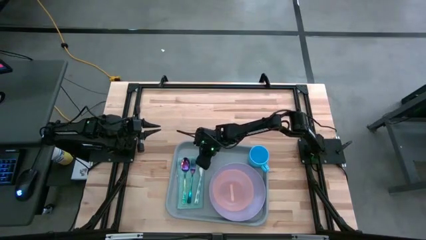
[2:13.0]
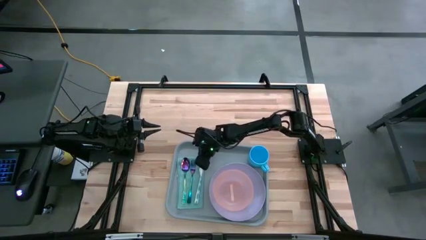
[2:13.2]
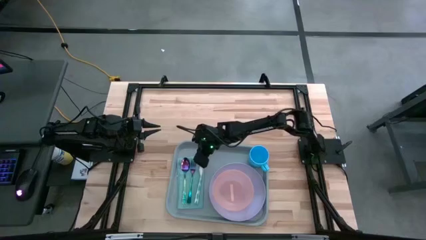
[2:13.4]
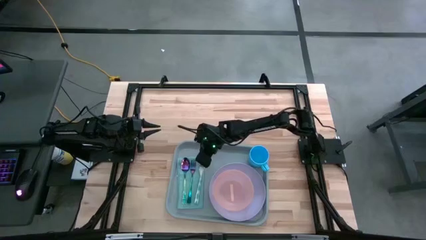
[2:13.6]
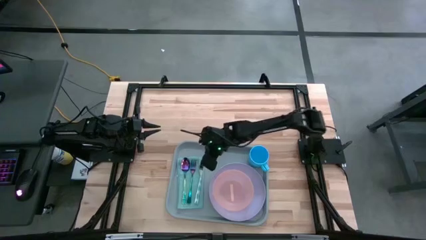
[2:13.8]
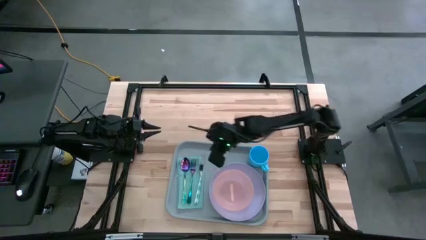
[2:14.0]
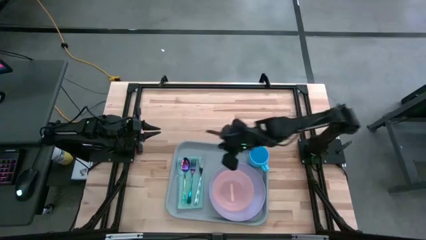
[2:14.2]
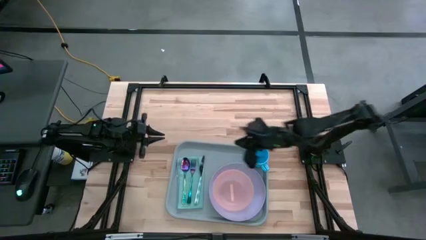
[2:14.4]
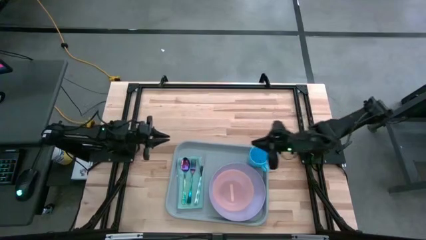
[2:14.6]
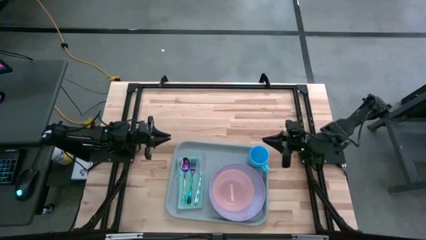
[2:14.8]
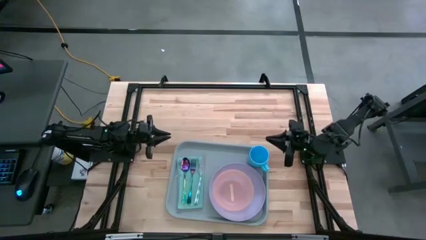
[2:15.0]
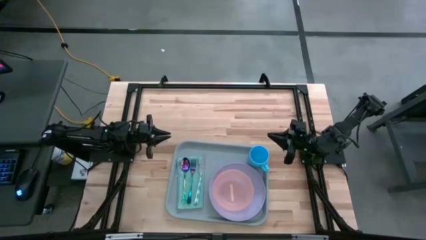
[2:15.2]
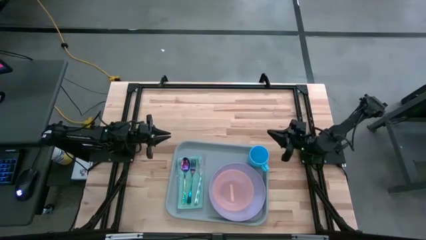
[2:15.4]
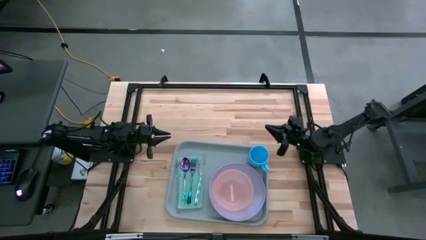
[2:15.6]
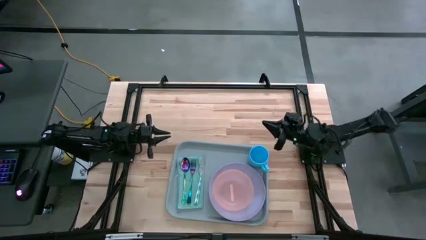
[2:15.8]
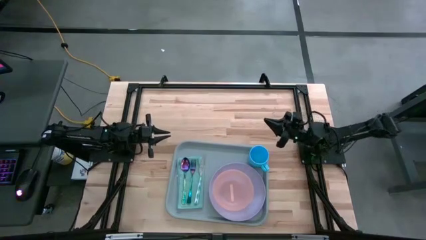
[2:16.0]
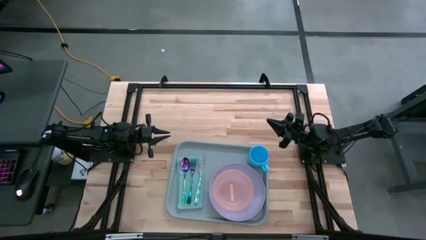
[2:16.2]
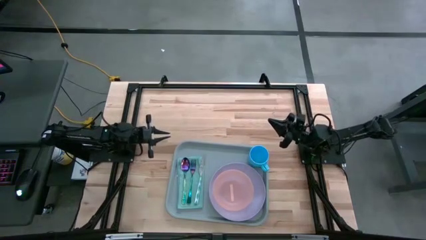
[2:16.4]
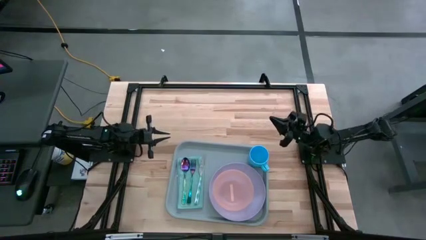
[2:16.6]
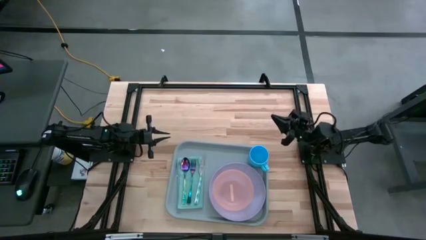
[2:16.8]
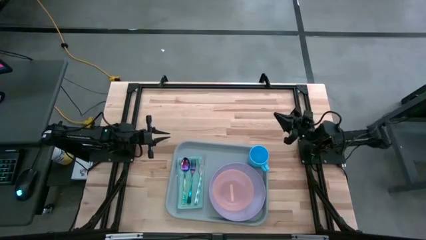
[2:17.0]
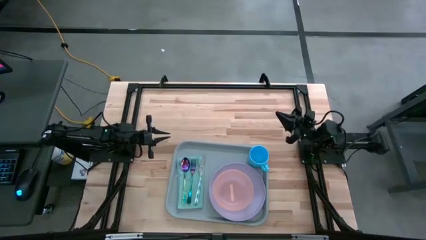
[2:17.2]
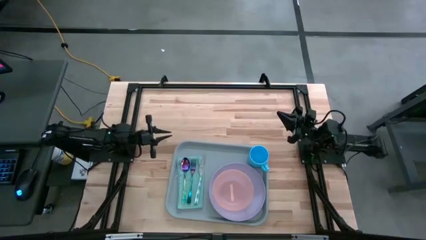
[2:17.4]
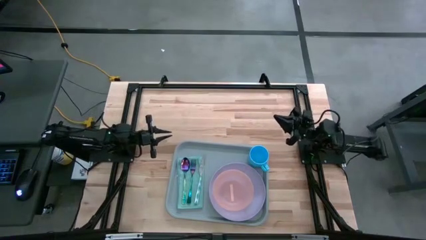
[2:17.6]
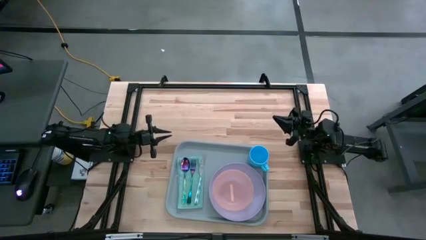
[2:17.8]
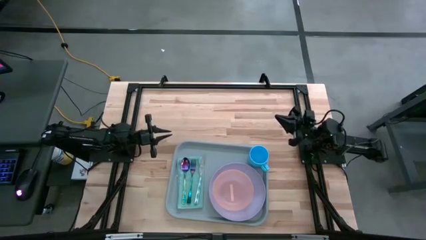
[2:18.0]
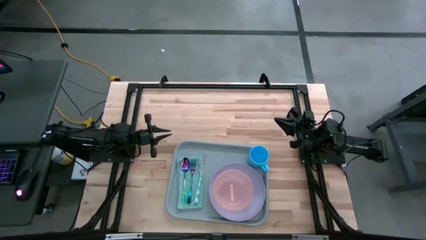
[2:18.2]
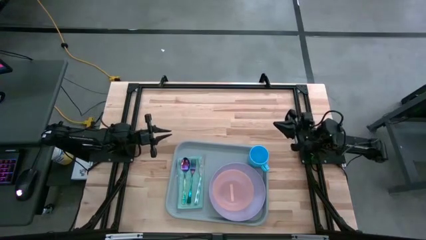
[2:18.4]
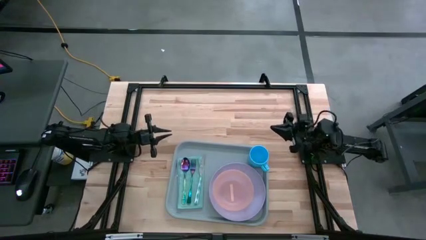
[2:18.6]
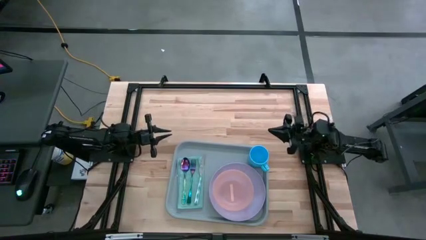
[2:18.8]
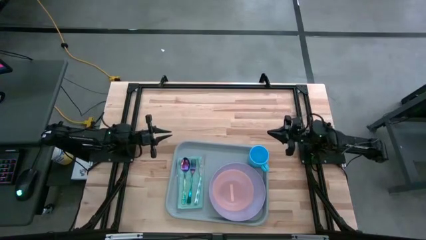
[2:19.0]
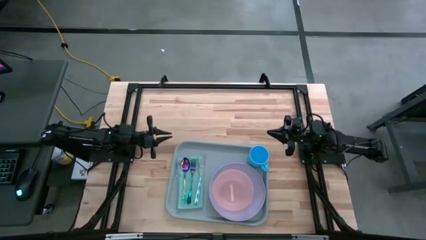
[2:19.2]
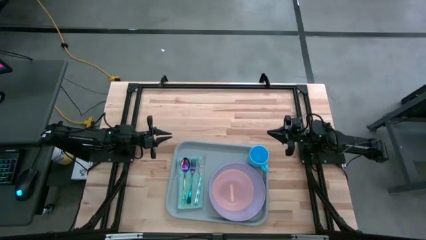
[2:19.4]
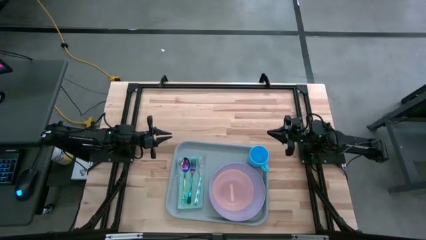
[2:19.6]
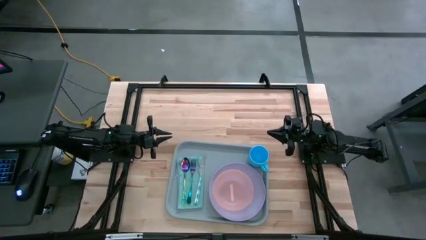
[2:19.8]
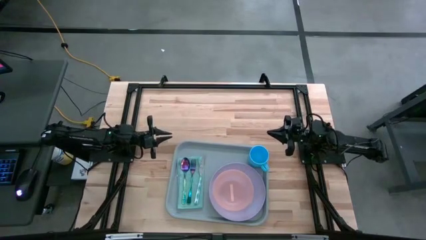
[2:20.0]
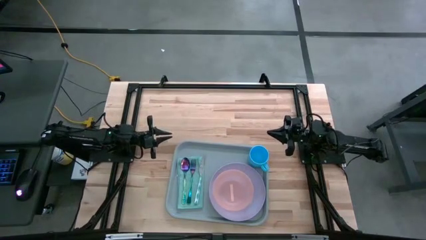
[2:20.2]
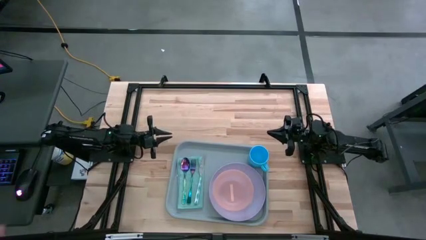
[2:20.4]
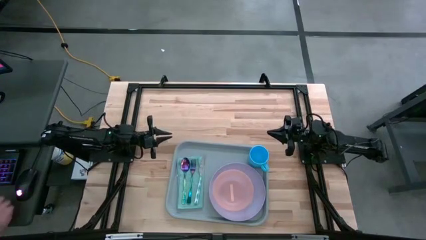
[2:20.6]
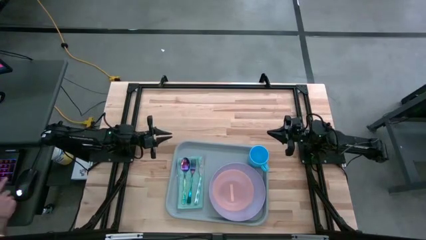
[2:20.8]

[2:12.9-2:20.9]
Task: Set up tray
Return to Home Position

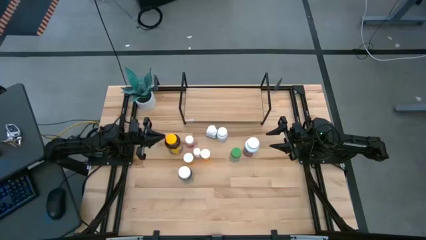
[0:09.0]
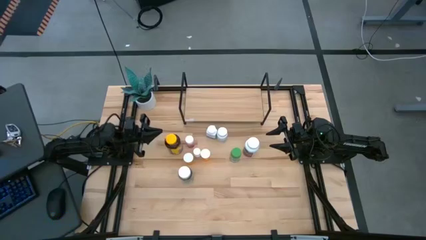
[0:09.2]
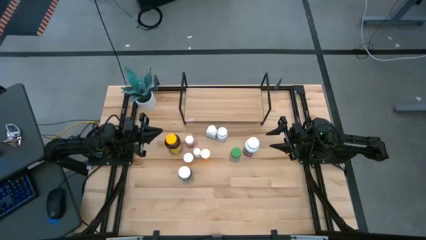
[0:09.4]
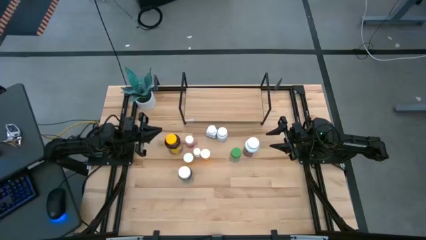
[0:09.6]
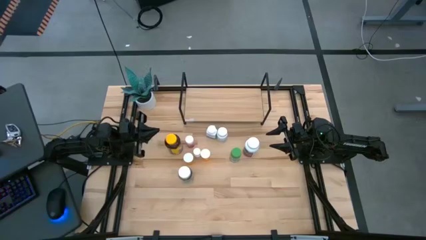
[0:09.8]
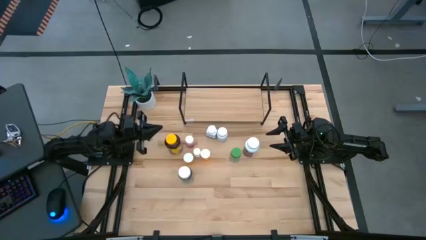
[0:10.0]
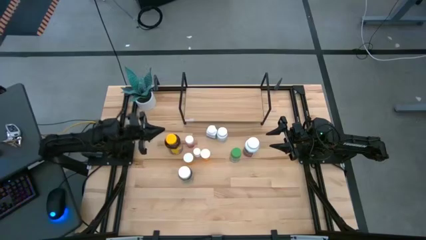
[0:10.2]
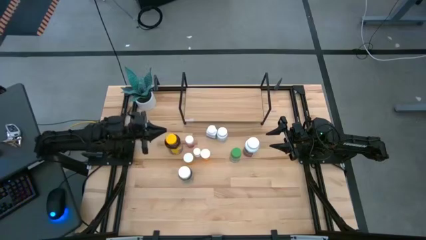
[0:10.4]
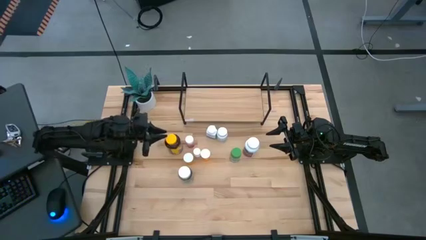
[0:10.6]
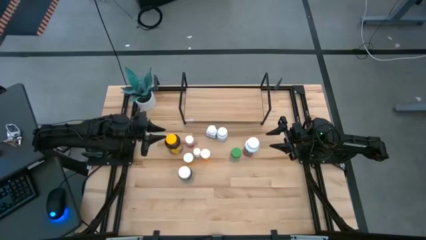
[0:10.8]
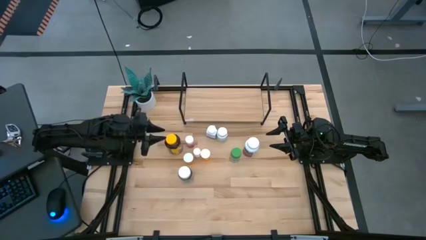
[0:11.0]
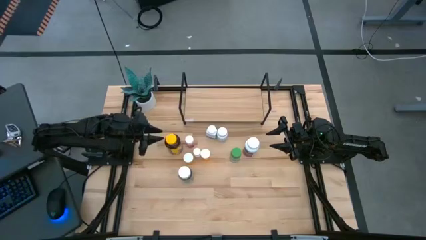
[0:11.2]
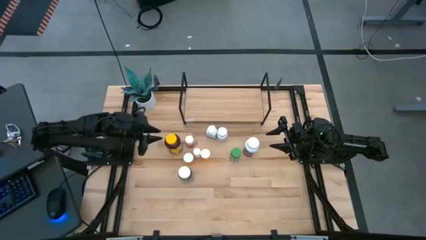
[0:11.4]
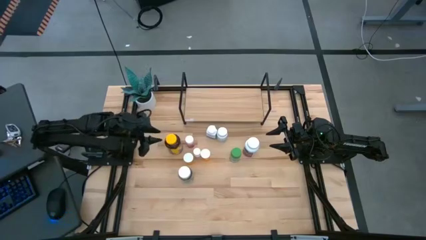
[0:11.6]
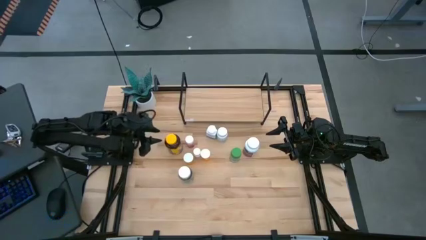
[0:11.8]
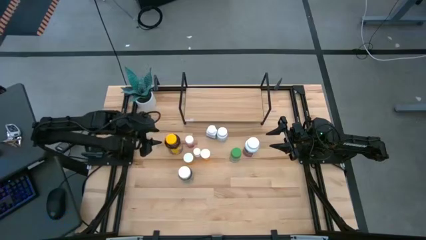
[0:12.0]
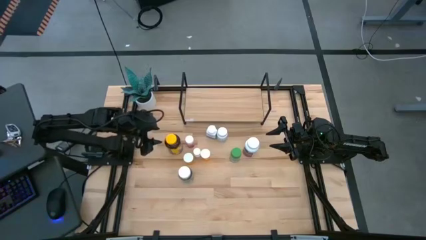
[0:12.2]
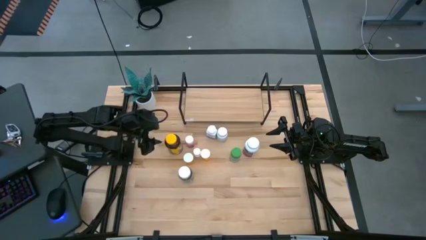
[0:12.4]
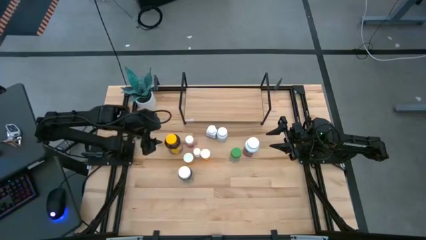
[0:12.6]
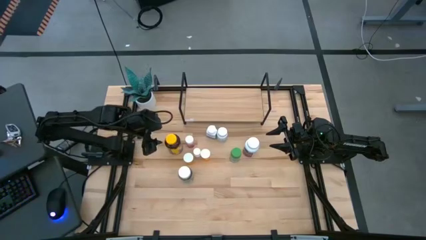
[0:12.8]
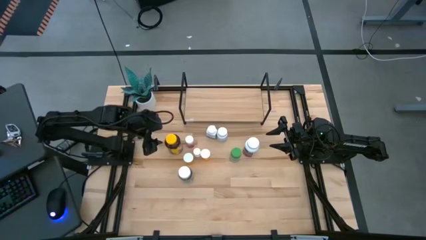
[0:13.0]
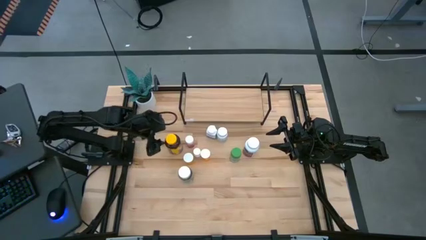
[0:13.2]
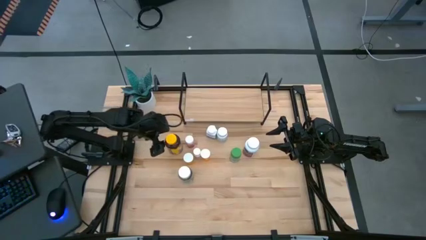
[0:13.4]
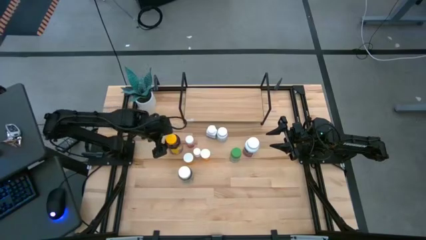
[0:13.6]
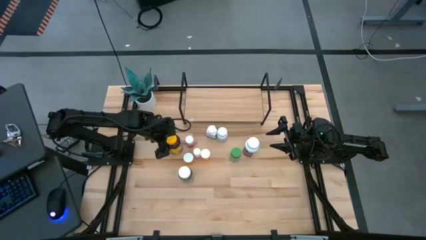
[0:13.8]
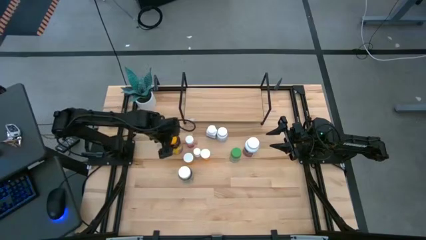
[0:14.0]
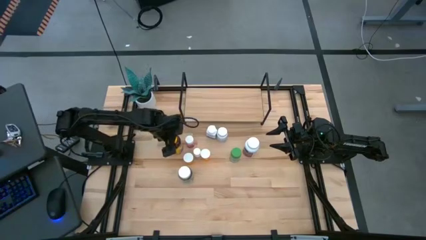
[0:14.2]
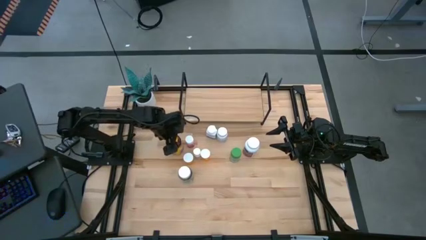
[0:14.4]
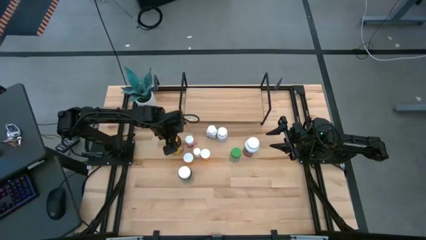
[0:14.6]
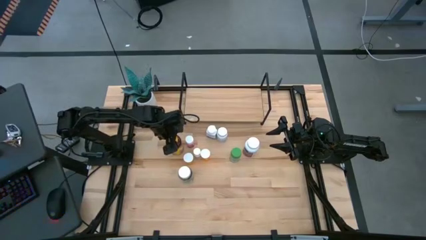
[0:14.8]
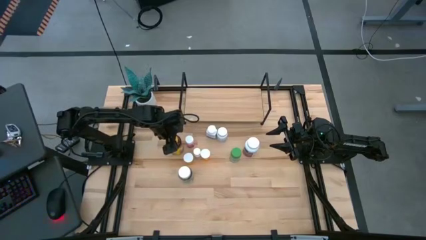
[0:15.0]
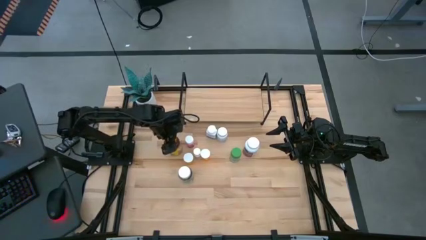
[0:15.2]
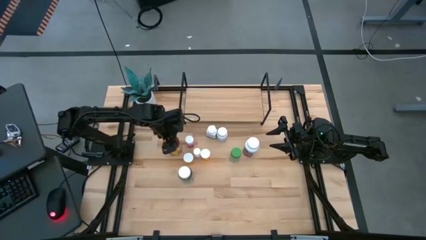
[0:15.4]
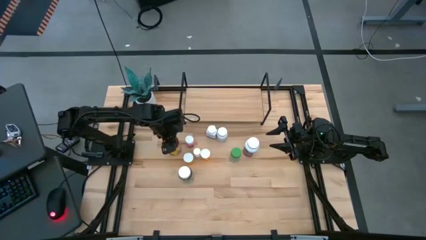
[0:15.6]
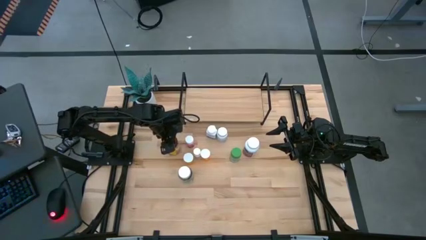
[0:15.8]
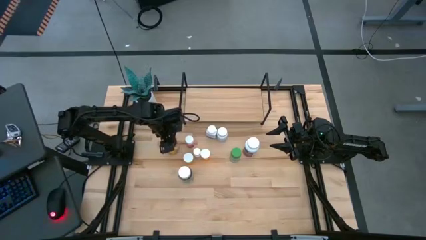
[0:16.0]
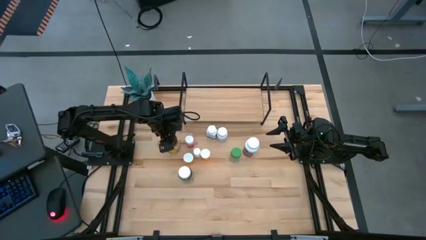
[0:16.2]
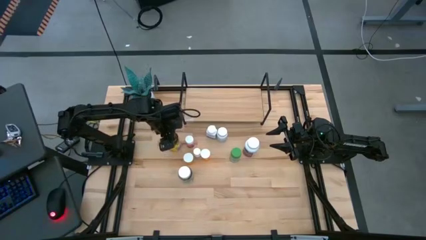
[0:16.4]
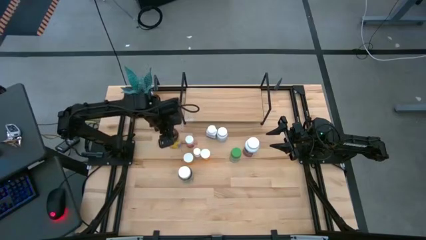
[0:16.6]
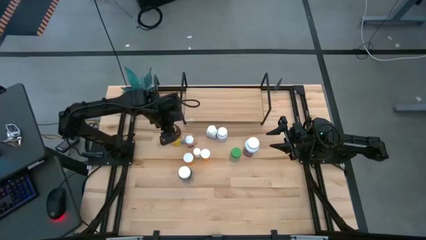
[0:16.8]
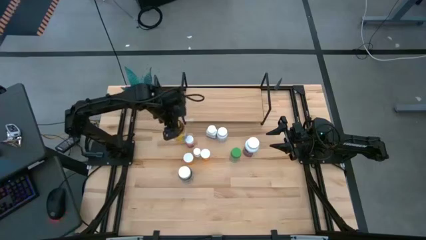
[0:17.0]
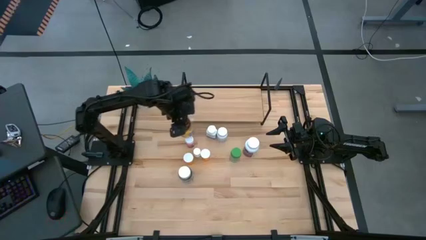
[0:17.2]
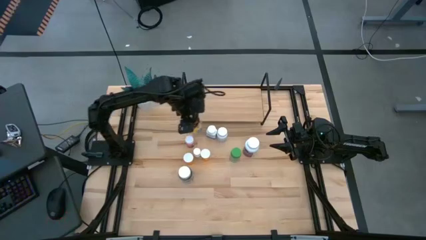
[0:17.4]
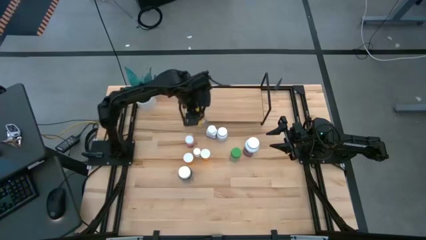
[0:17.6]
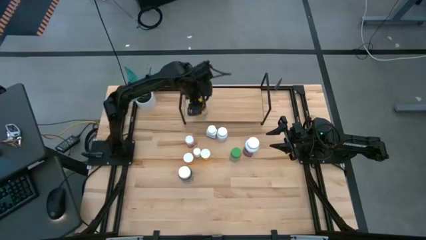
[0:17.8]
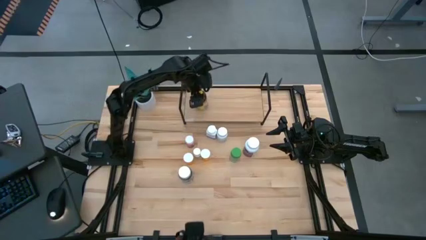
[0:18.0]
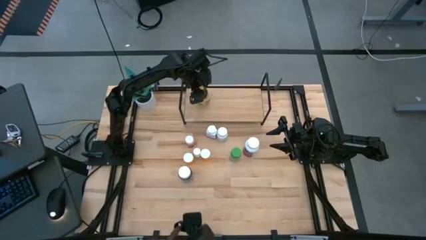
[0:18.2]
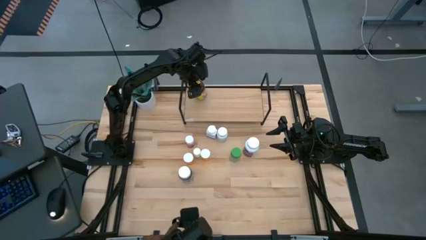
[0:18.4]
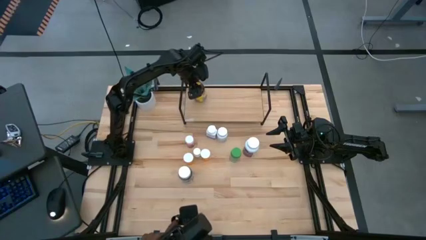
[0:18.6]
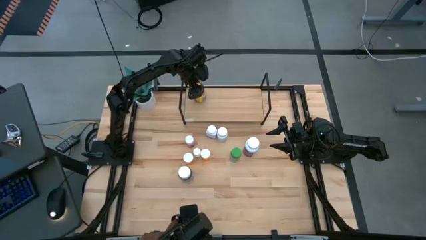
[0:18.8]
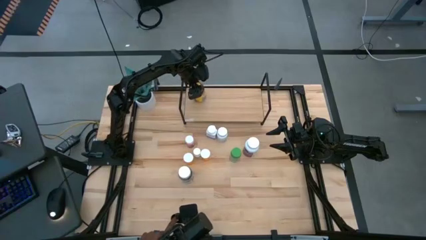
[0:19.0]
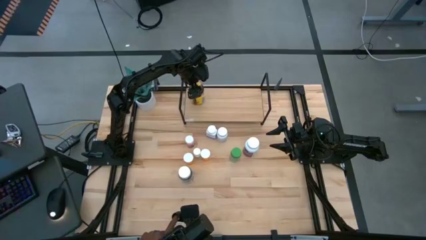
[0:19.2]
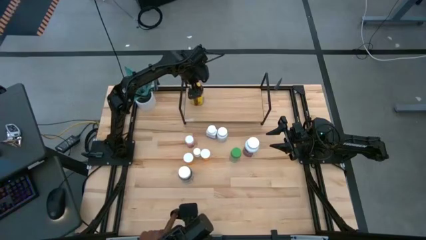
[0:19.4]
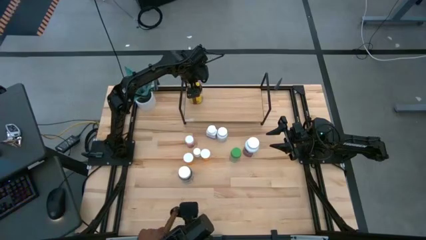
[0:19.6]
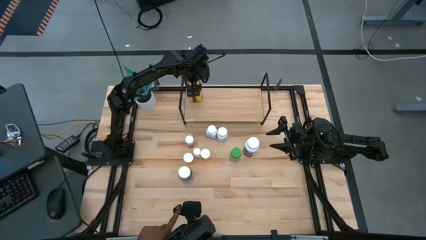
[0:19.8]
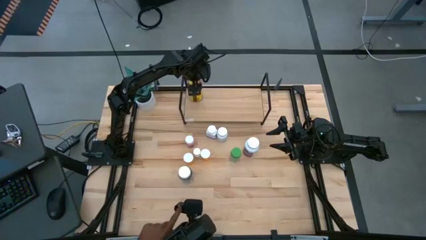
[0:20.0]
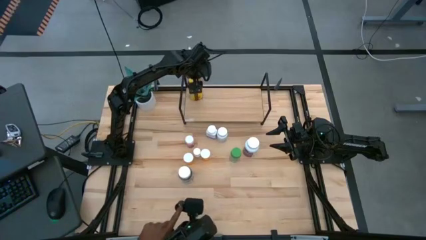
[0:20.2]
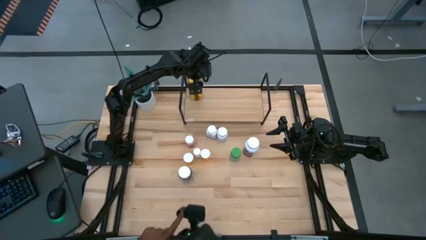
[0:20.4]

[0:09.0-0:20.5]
Task: Pick and place medicine bottles onto shelf by color
Put the yellow medicine bottle on the shelf
